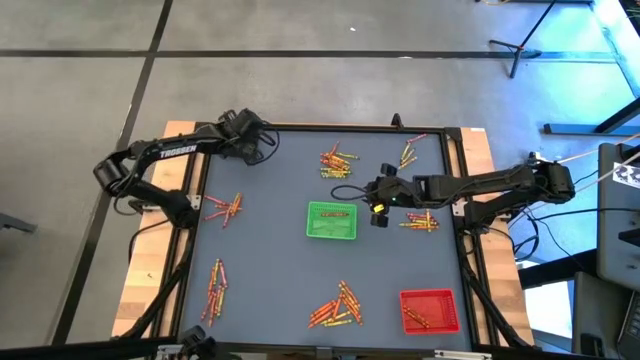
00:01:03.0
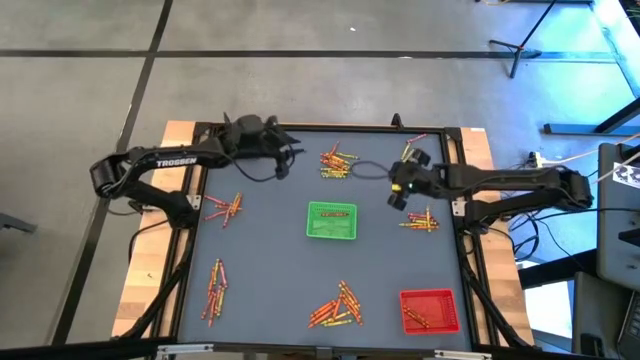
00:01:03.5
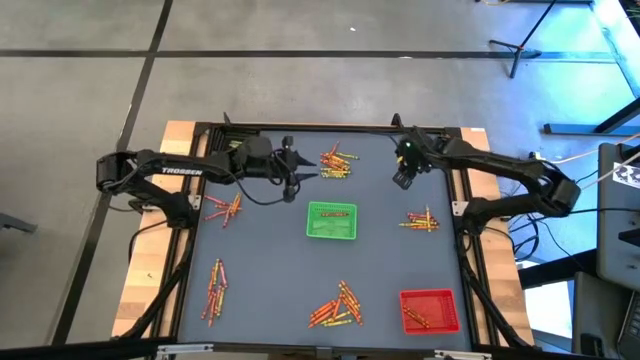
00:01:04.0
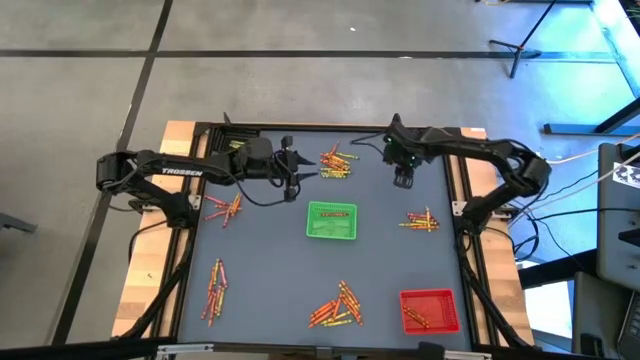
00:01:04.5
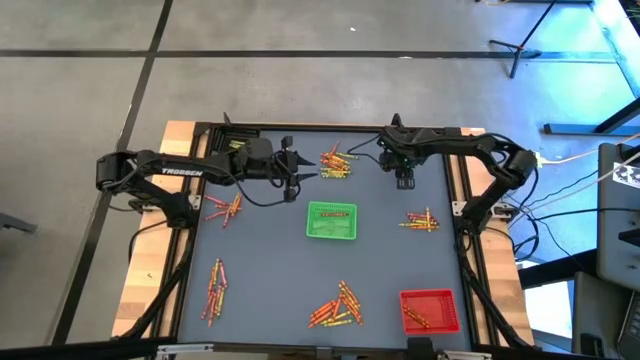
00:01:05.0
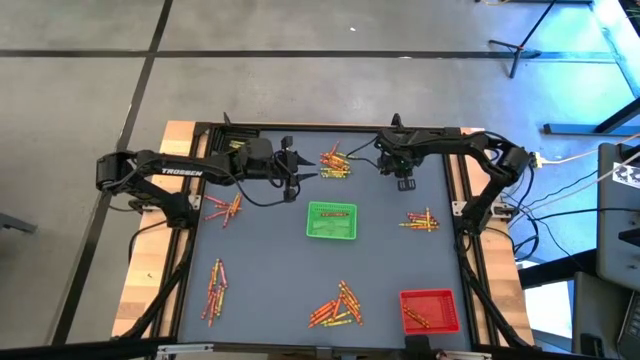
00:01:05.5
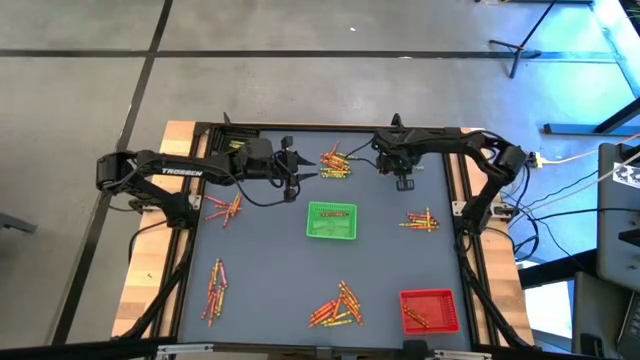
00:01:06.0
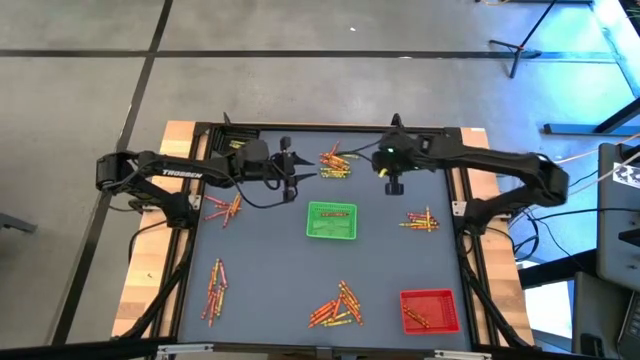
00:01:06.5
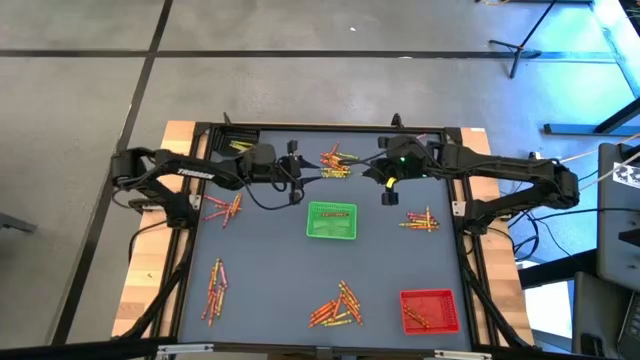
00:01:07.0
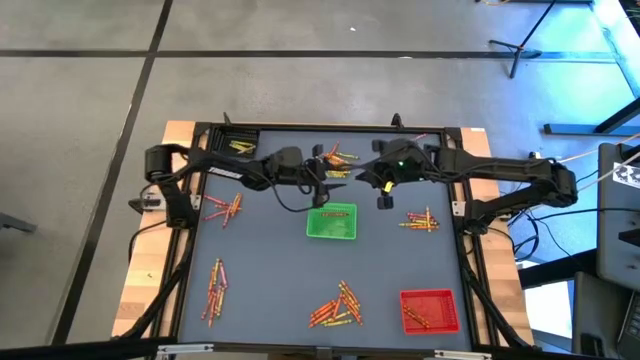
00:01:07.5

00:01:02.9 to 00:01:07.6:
Task: Sort crayons
Put the light green crayon into the black bin

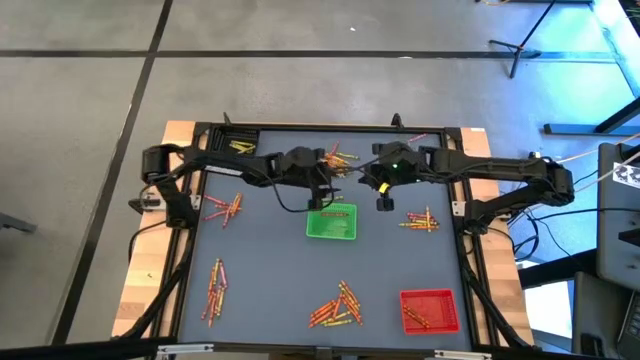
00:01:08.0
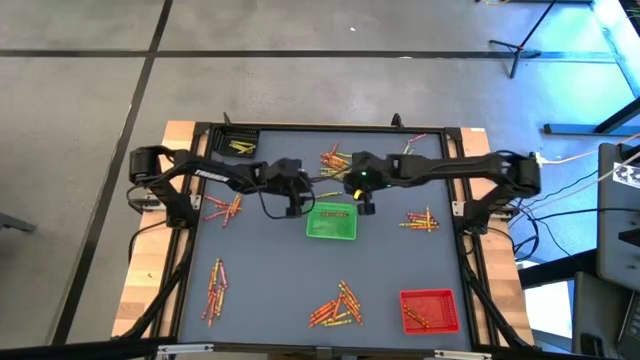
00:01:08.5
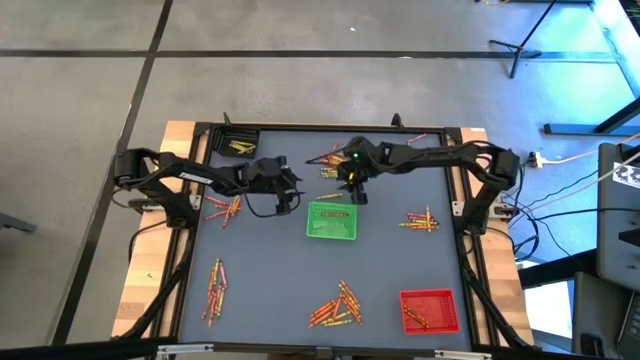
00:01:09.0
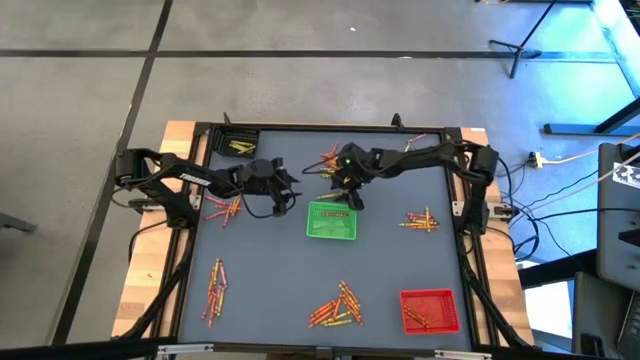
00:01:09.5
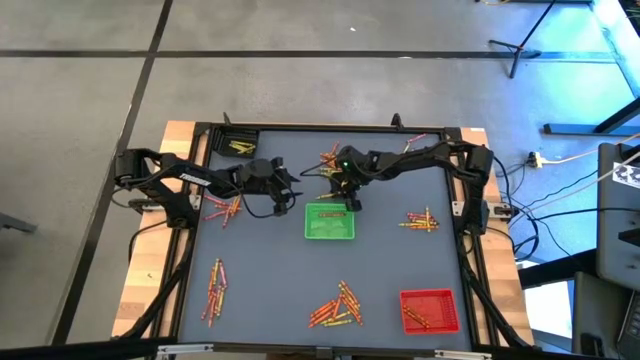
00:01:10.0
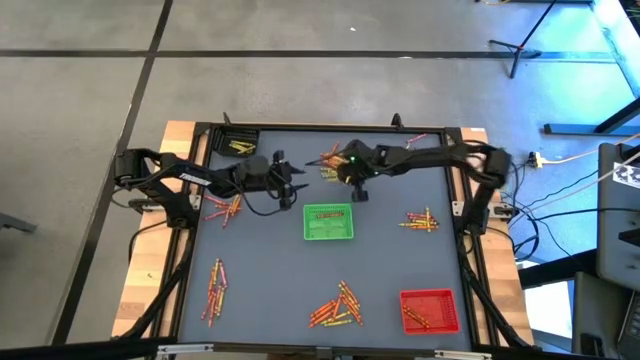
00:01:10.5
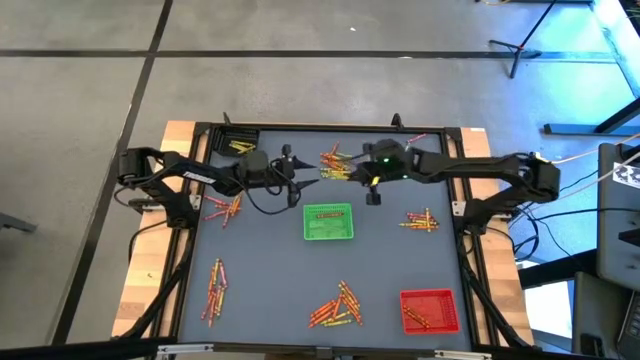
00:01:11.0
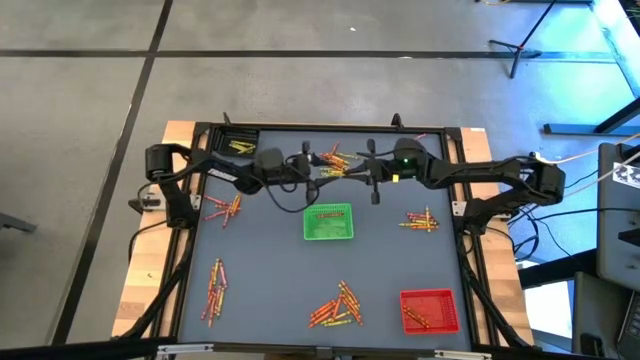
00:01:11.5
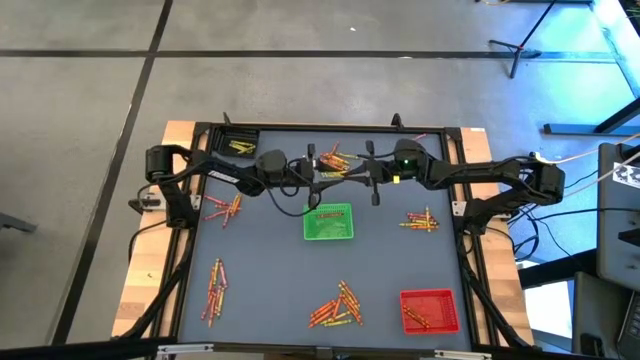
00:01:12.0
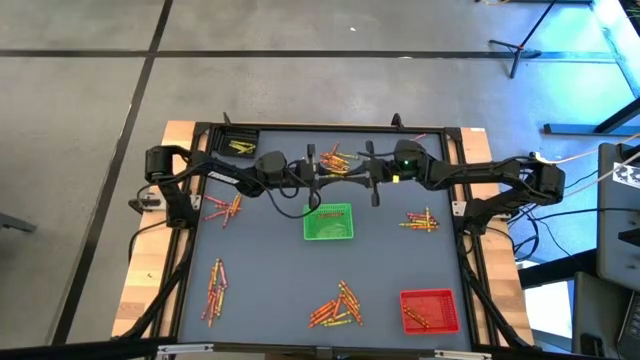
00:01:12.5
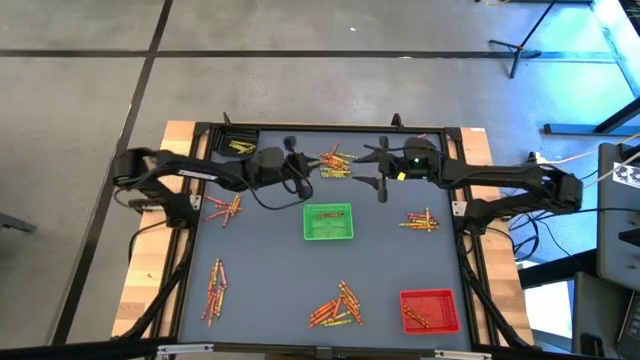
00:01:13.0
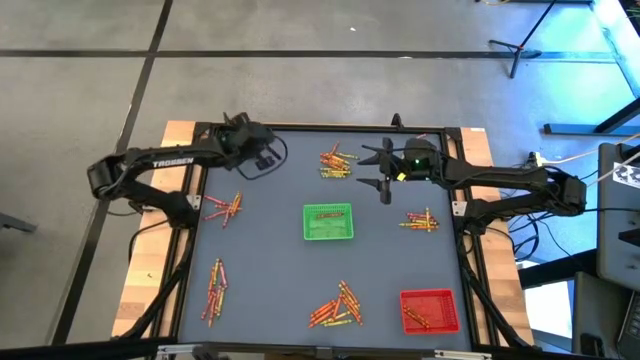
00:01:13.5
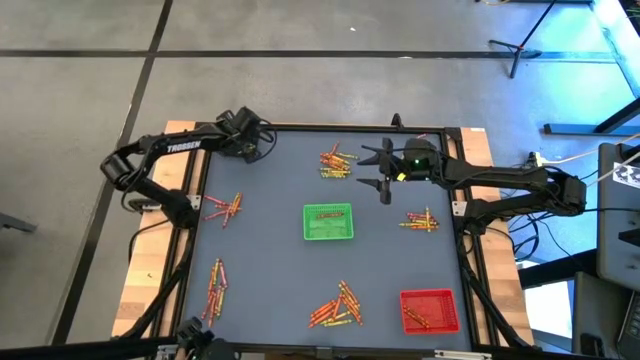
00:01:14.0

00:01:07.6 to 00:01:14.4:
Put the light green crayon into the black bin

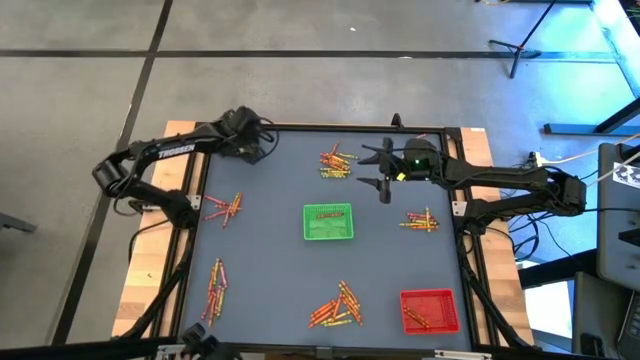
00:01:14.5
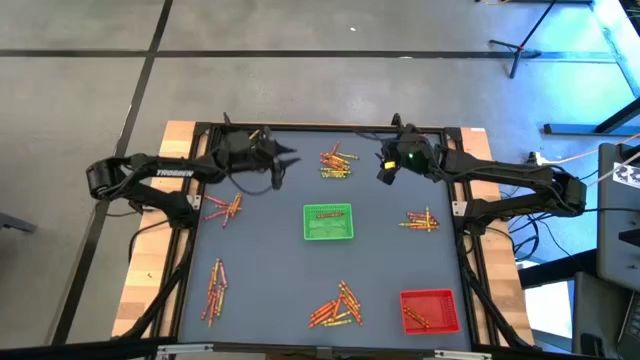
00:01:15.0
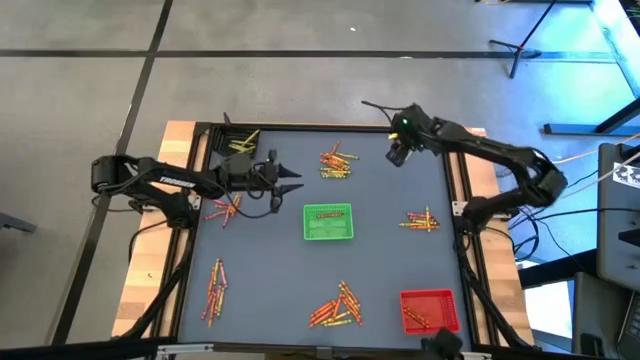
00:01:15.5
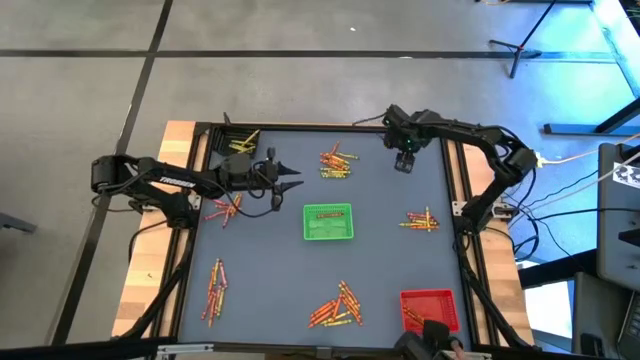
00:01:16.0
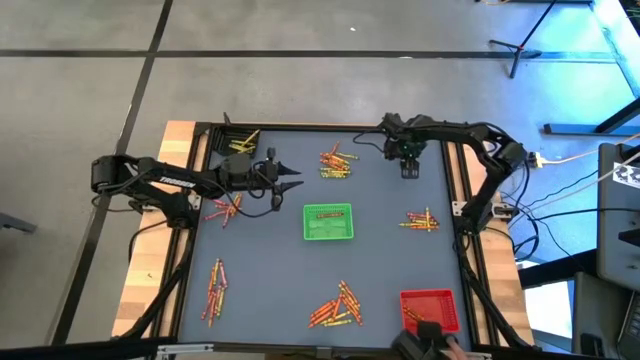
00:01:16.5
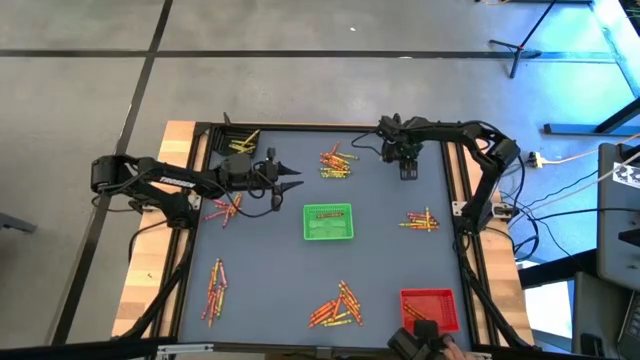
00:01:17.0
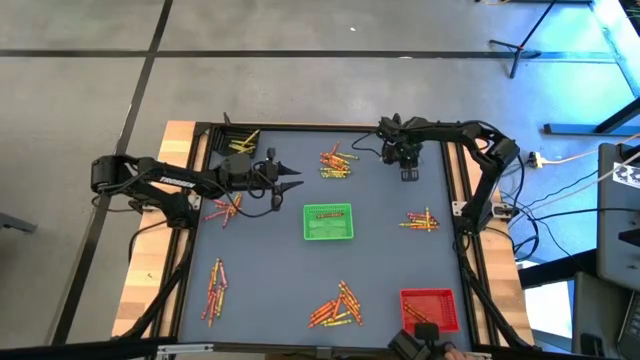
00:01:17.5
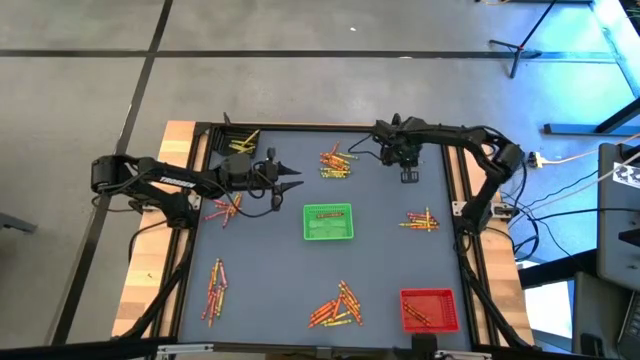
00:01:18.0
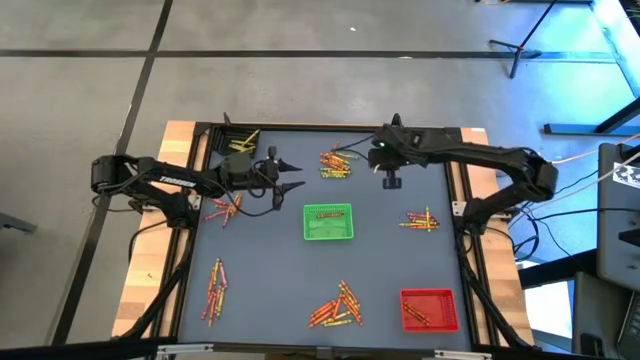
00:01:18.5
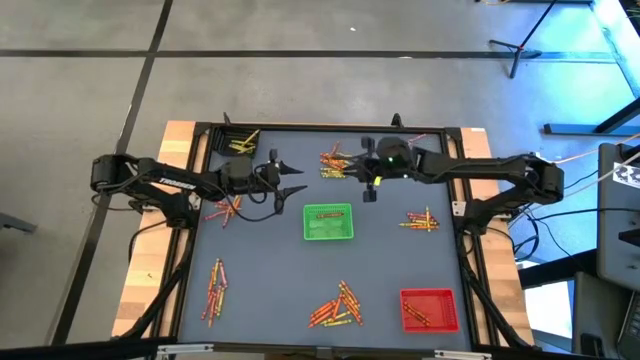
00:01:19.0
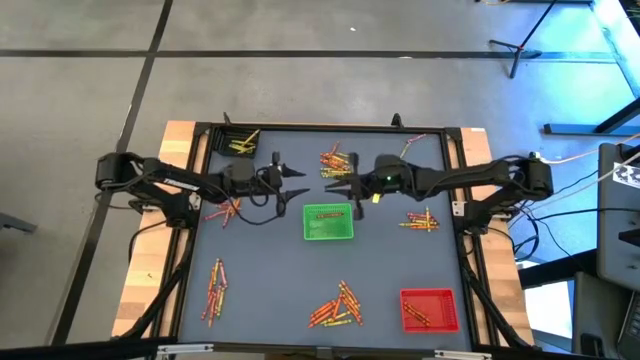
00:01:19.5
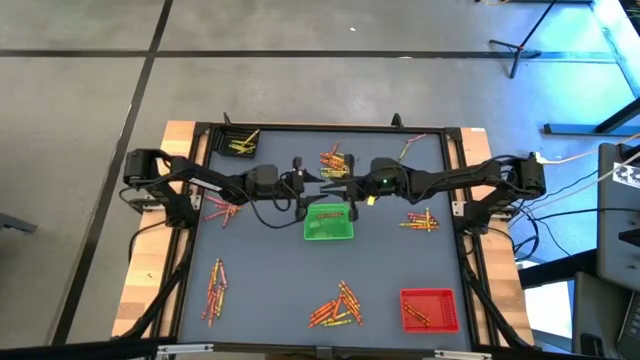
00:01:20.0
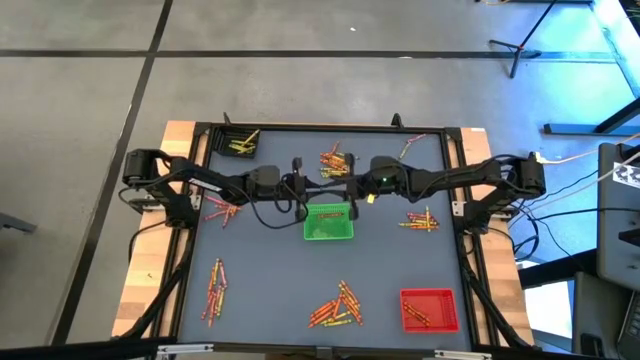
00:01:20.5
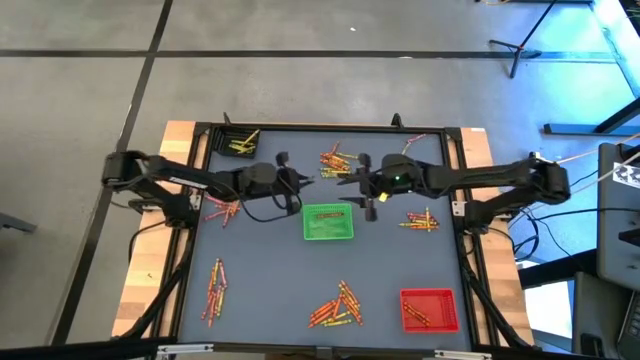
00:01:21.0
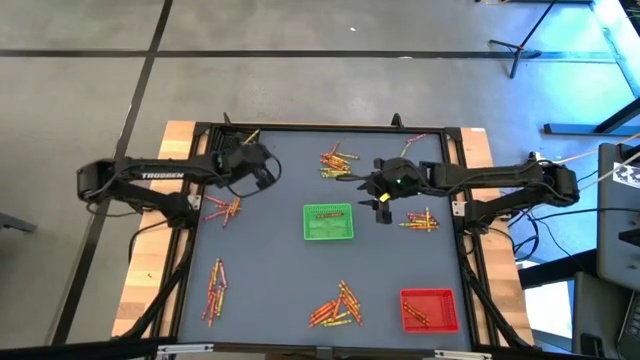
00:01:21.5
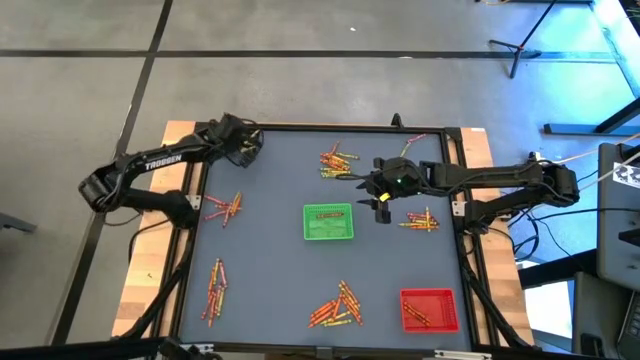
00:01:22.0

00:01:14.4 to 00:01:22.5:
Put the green crayon into the black bin

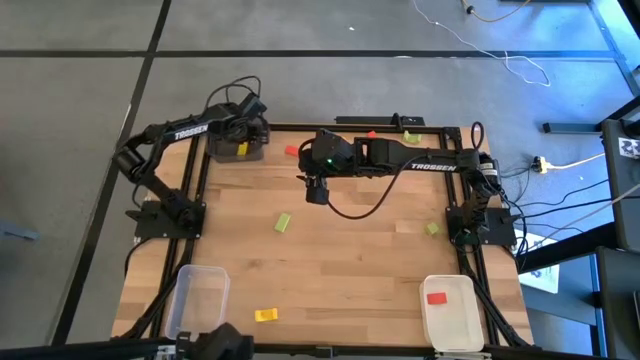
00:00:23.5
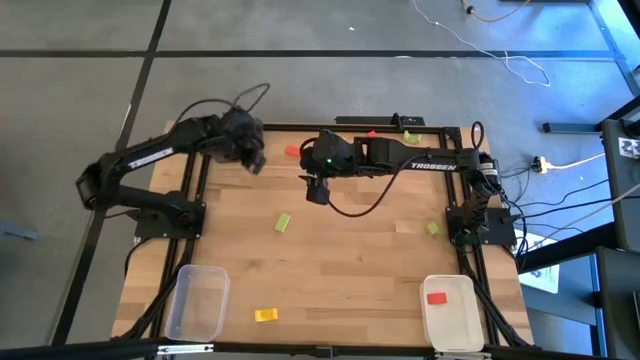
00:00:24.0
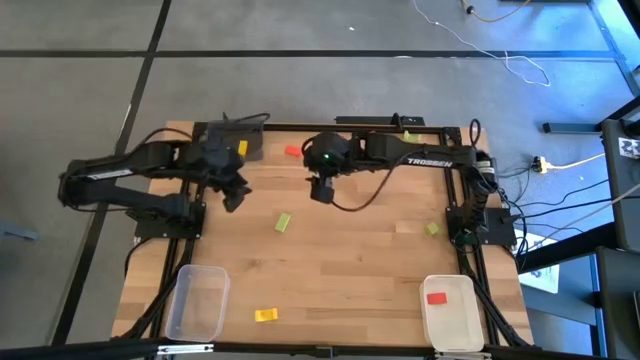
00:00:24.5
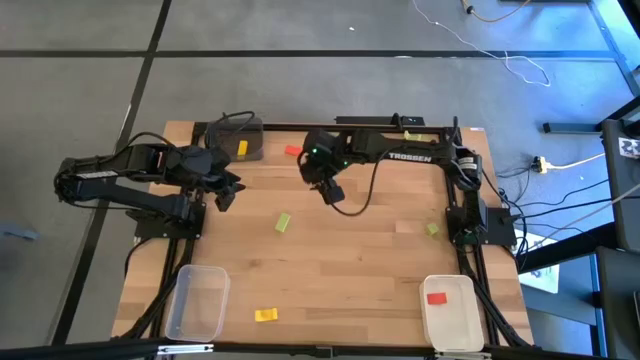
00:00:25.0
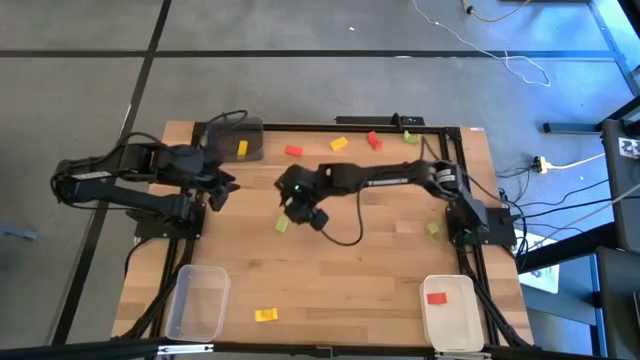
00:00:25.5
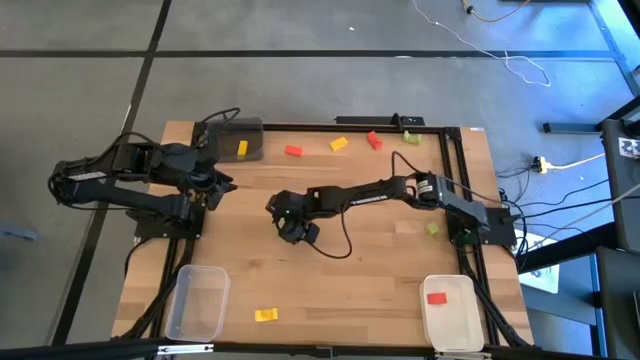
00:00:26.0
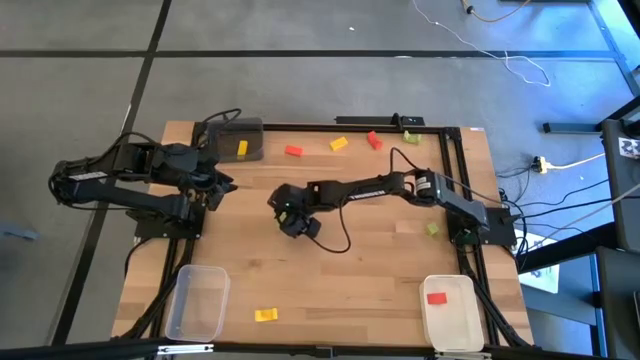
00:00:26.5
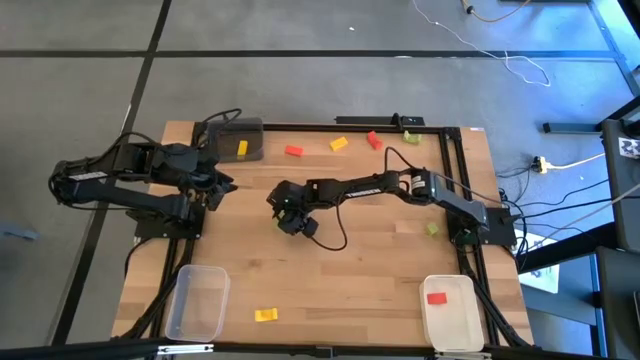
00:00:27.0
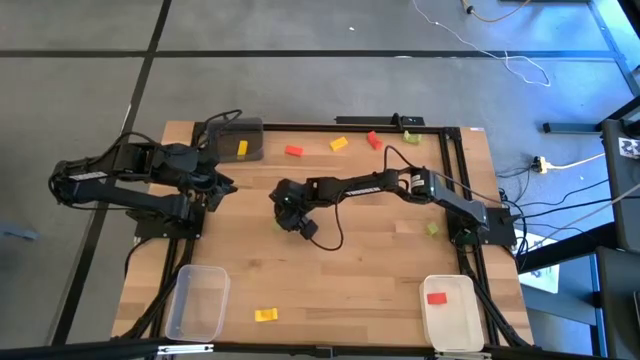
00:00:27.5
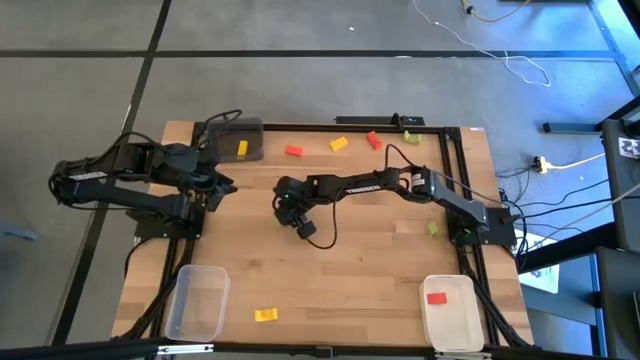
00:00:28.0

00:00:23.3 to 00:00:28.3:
Task: Sort & place blocks by color
Put the bottom left green block into the transparent bin
